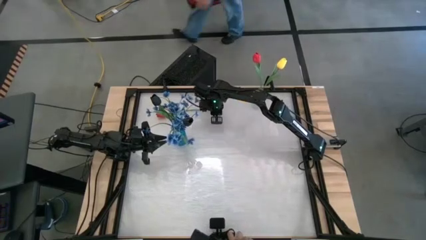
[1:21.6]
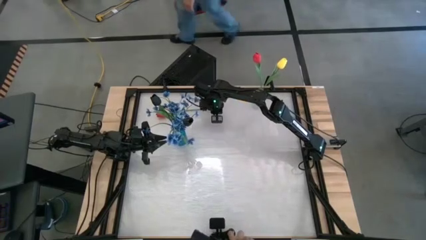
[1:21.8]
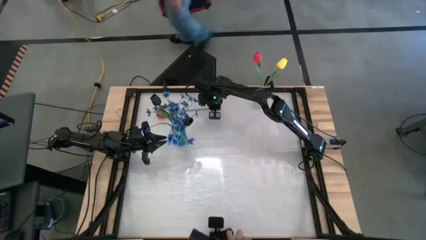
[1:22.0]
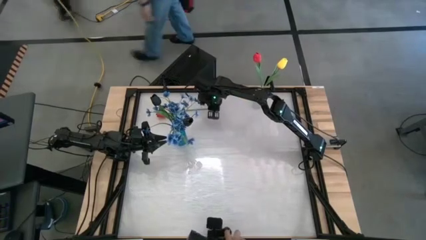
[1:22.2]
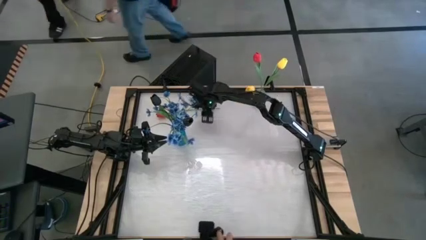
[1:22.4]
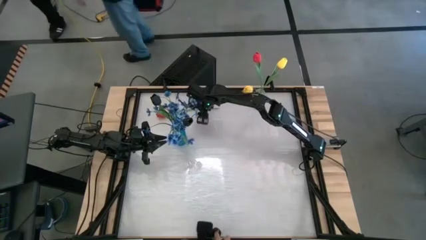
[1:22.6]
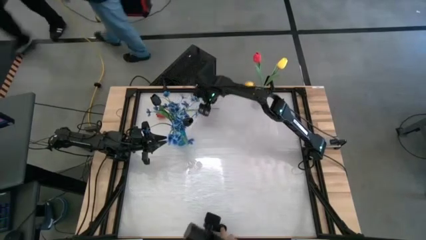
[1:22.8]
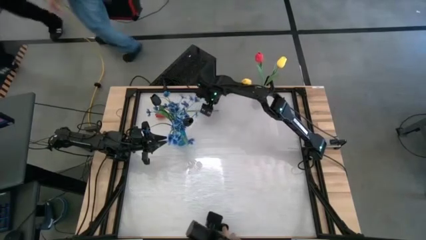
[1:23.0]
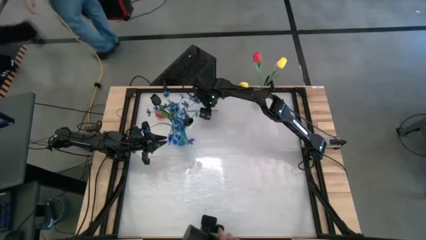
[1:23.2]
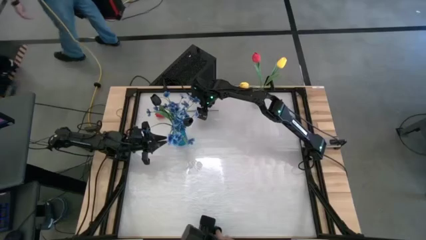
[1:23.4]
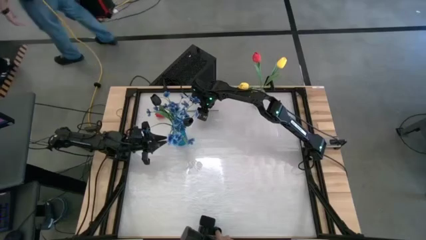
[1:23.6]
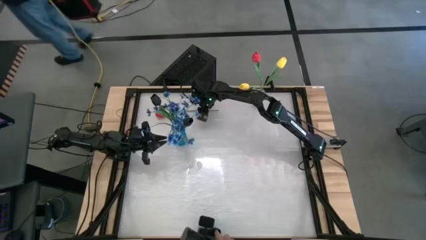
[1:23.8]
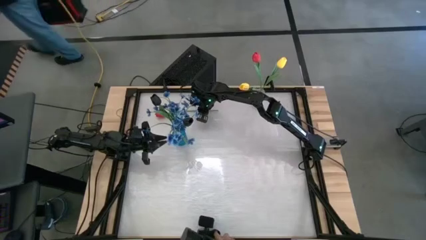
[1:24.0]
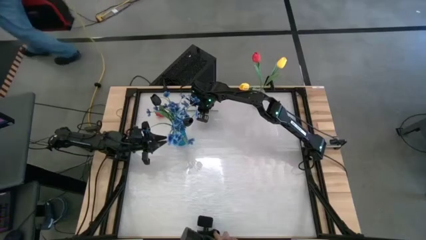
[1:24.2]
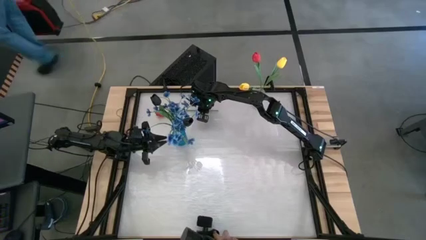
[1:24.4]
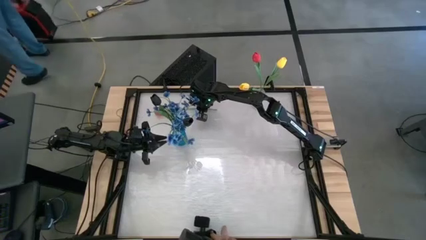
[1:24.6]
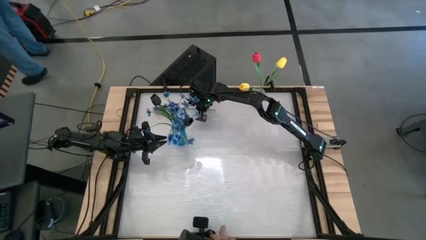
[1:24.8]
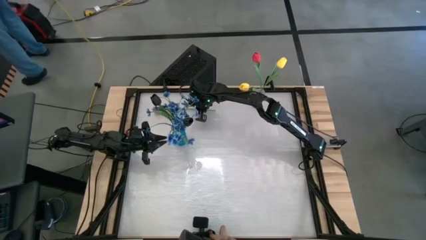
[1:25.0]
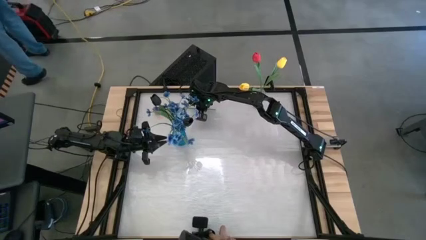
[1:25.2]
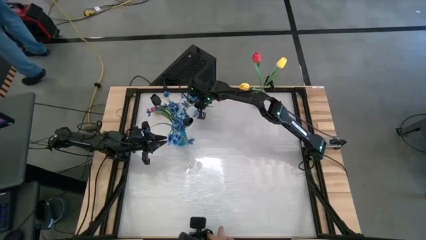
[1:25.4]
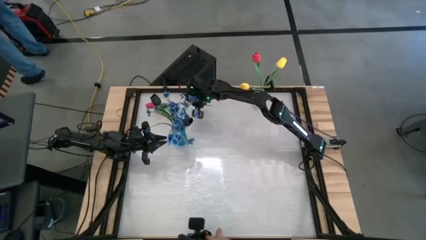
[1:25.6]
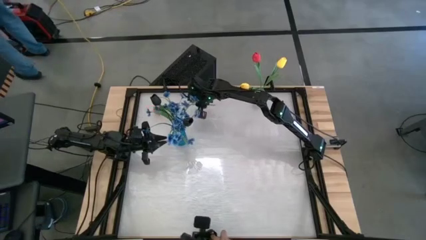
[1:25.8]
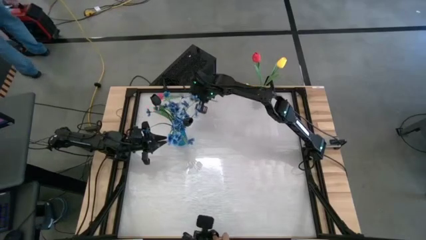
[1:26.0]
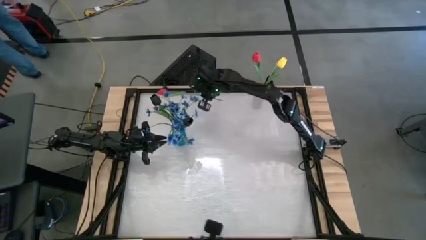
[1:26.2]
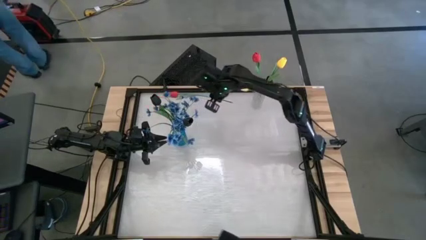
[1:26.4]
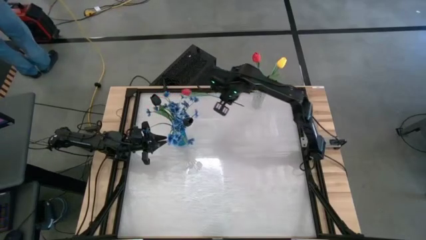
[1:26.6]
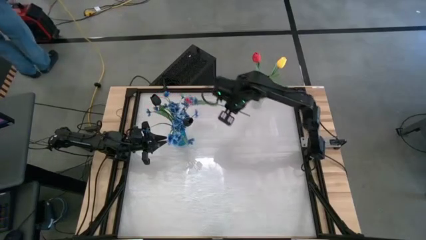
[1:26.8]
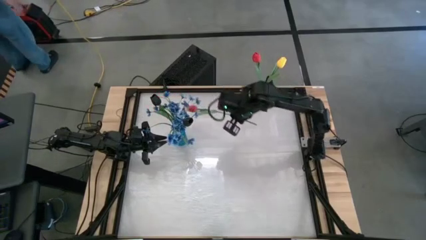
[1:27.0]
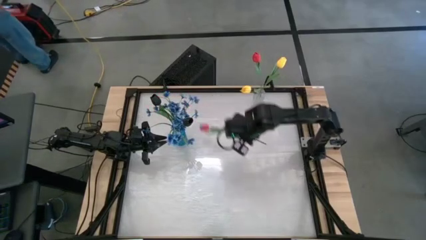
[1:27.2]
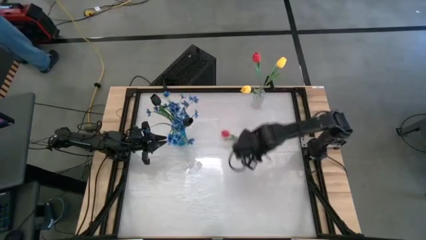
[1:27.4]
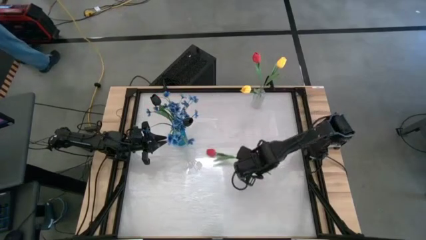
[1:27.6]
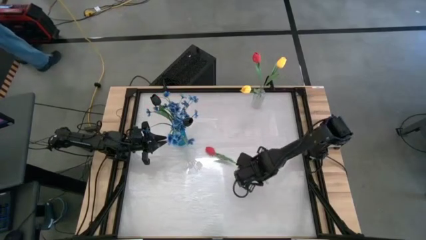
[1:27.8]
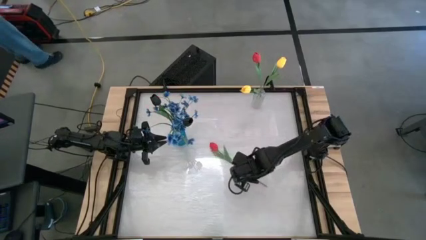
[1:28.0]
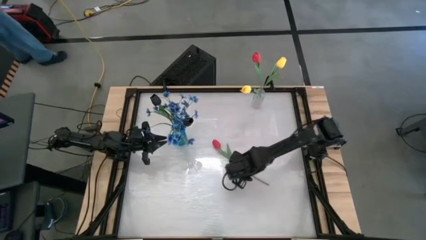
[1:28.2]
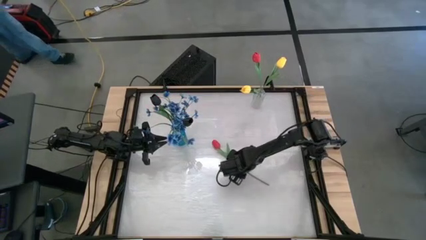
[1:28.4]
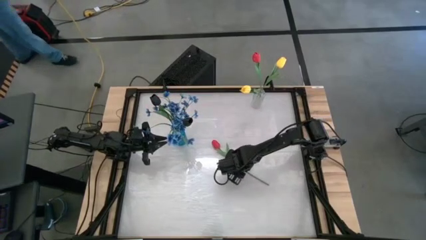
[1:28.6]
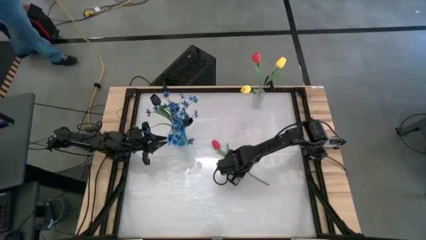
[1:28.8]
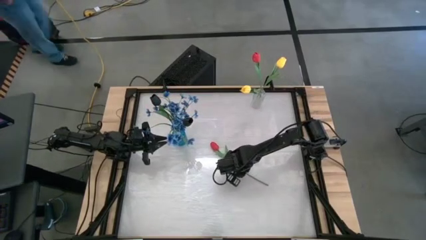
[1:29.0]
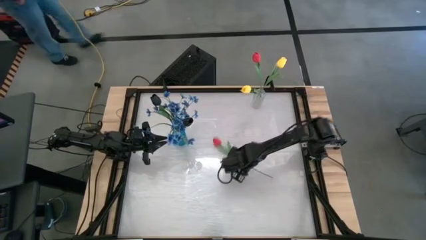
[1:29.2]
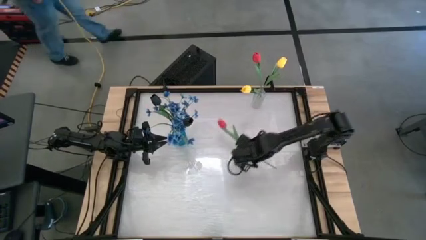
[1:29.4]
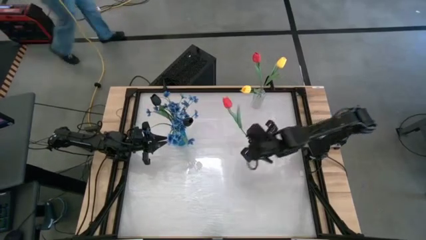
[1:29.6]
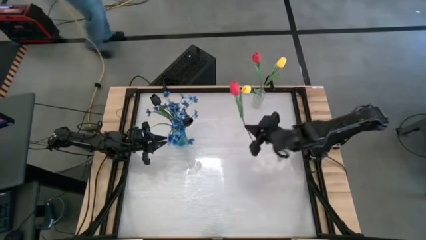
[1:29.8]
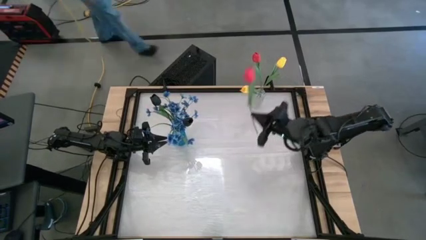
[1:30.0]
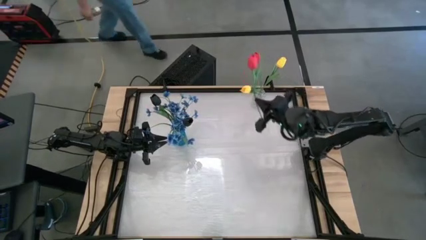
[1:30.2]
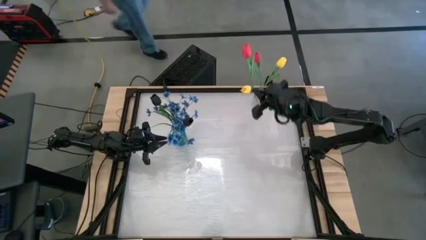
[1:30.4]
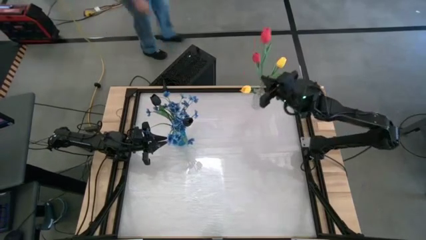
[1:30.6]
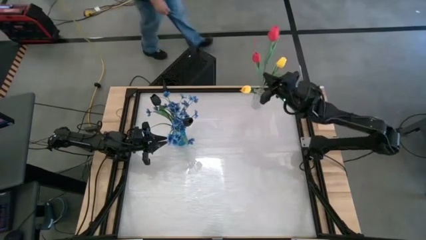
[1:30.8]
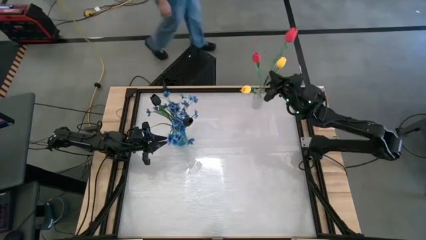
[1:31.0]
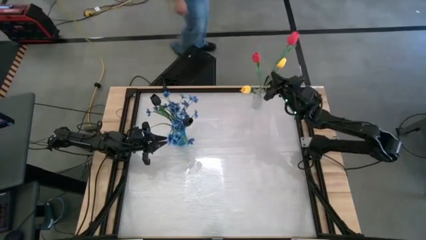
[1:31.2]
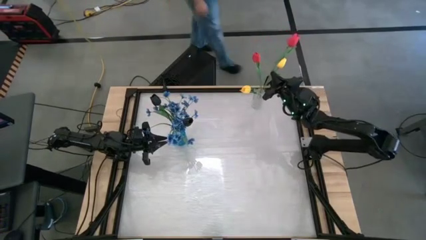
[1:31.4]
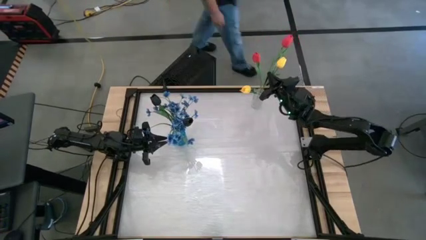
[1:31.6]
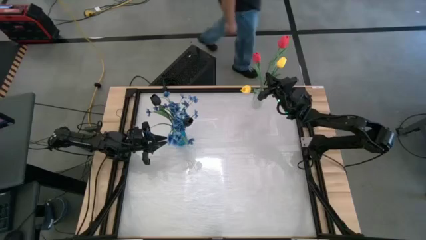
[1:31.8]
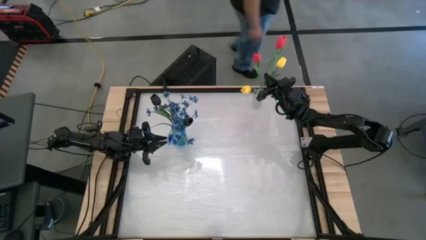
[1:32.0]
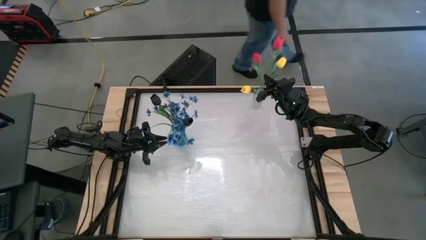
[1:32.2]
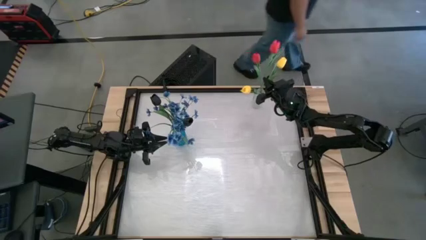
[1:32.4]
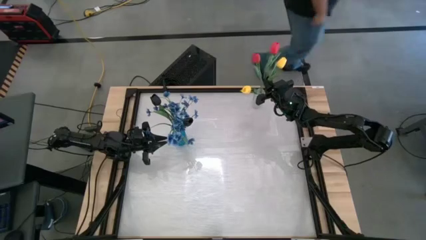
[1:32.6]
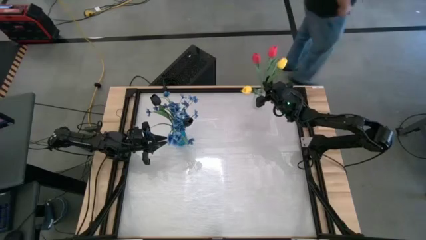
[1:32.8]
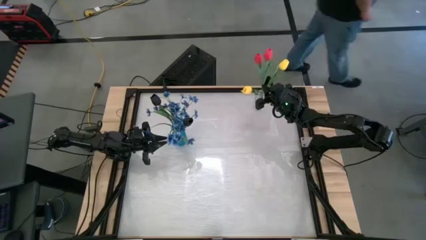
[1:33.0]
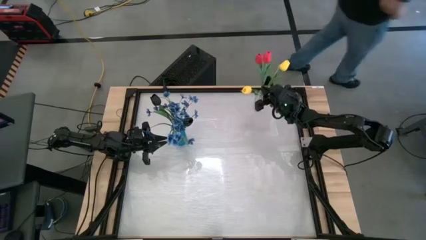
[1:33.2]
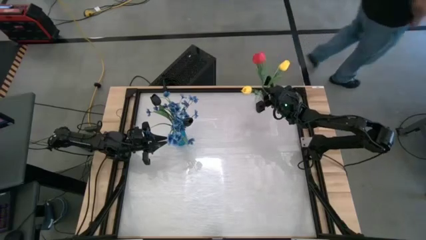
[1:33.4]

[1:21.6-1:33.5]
Task: Sort flowers into vase by color
Put the red tulip flower into the transparent vase

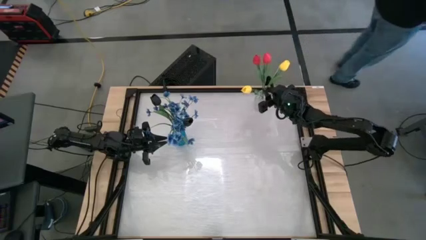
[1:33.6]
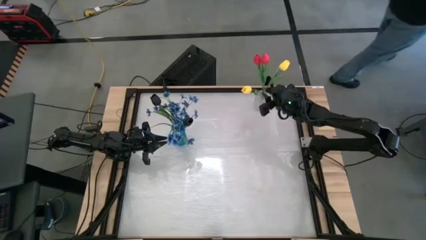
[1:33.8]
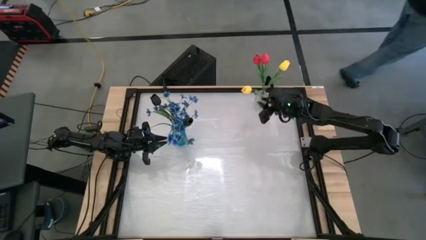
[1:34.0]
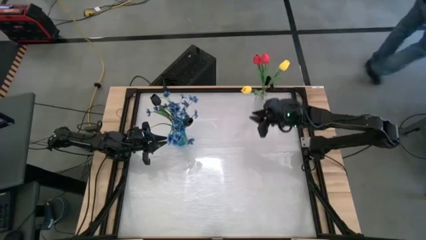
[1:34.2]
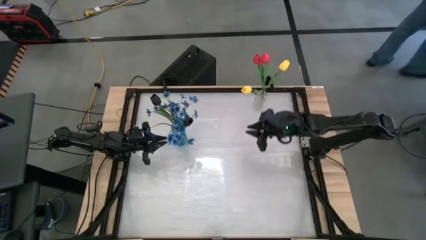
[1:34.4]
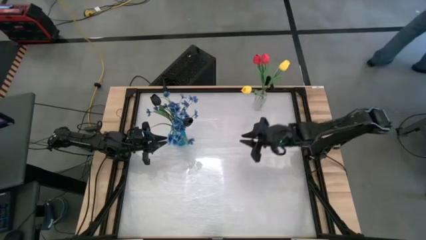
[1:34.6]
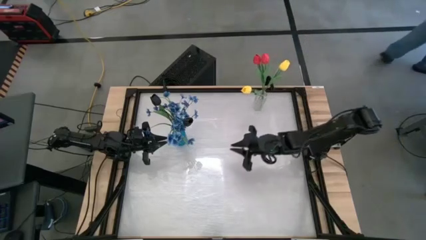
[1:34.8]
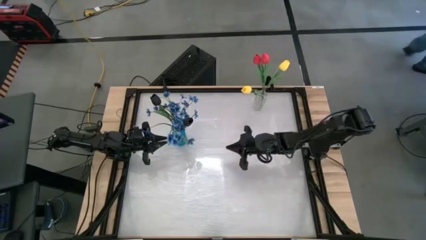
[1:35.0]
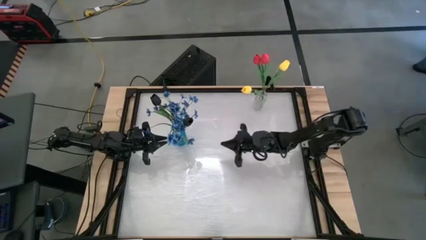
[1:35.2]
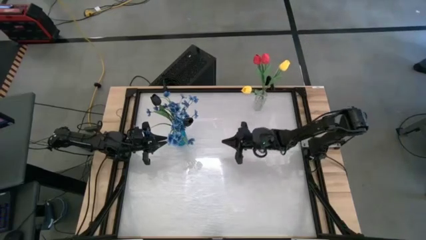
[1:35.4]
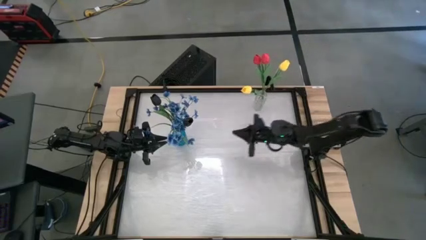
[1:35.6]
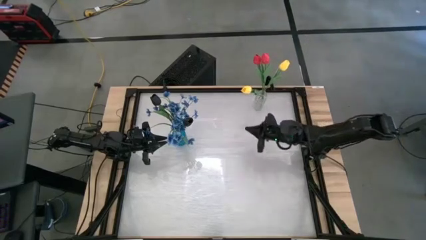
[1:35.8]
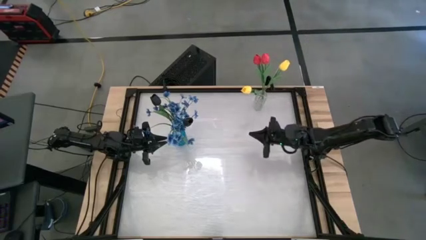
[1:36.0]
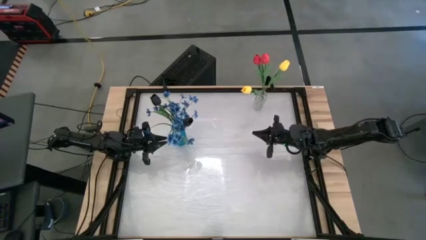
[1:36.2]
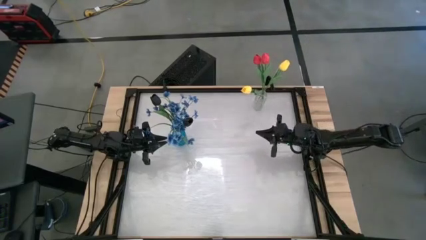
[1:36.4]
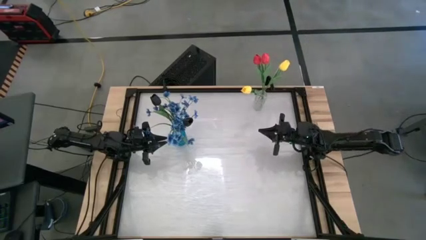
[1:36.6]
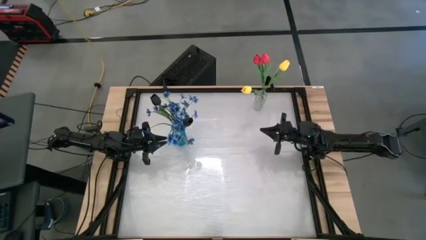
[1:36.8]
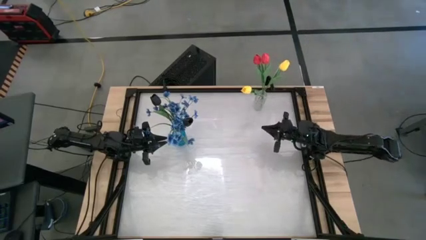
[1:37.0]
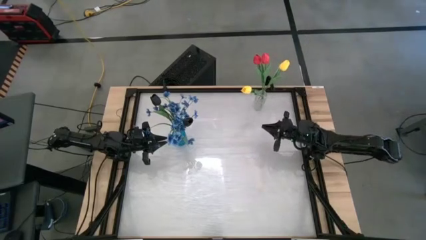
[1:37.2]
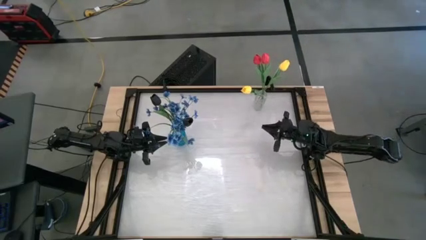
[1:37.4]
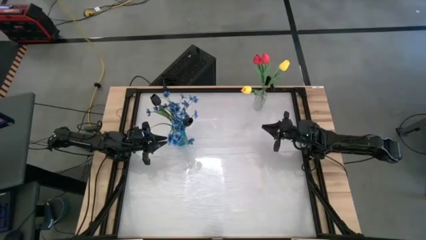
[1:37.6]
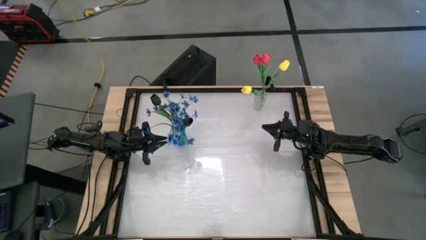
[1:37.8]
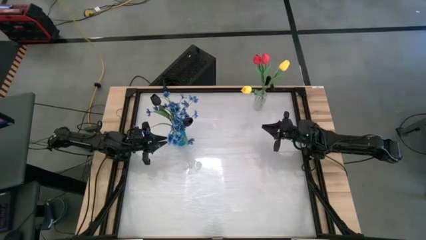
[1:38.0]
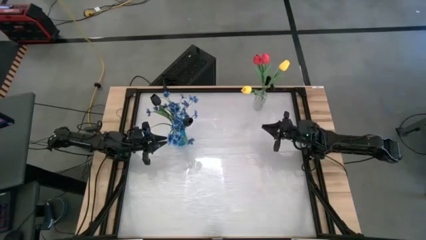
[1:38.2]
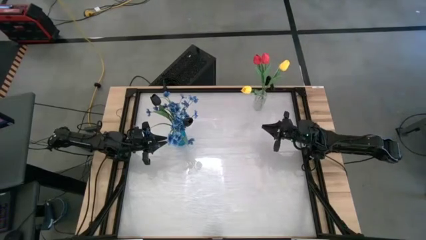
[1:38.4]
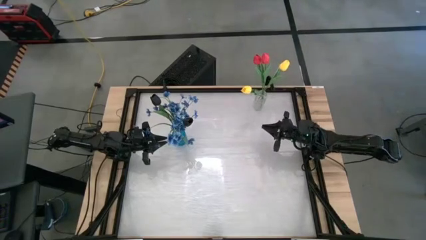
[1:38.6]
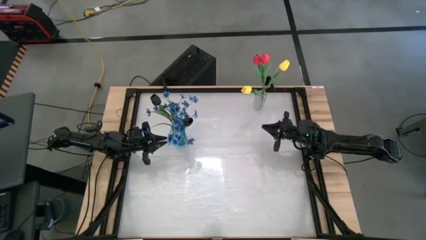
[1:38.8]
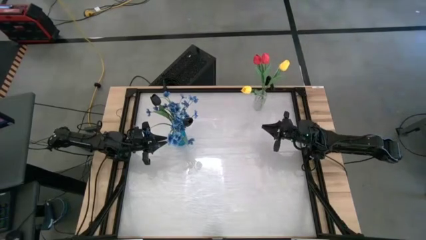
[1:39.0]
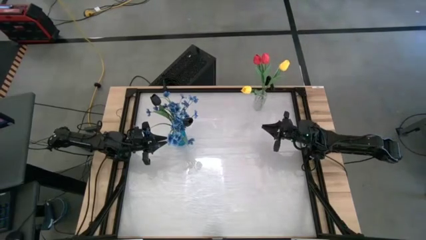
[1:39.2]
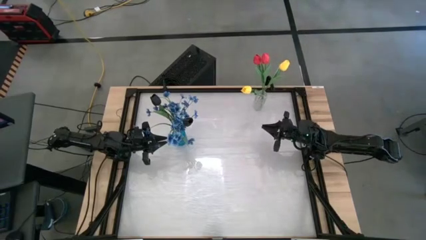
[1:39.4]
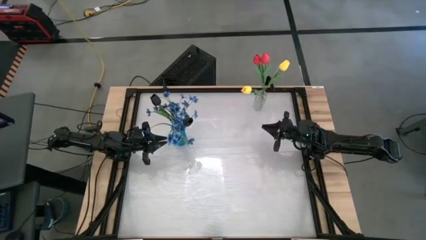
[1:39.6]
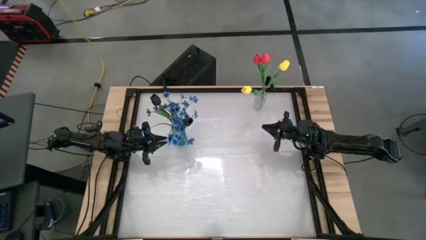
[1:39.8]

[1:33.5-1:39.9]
Return to Home Position
